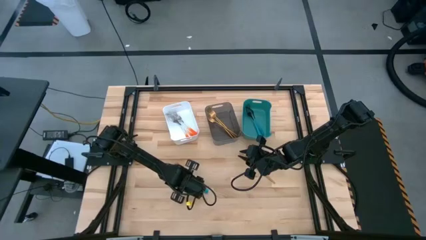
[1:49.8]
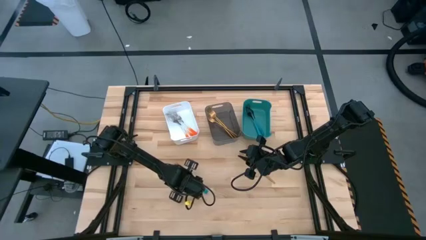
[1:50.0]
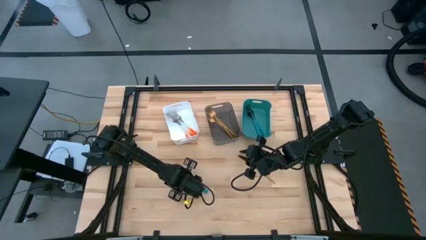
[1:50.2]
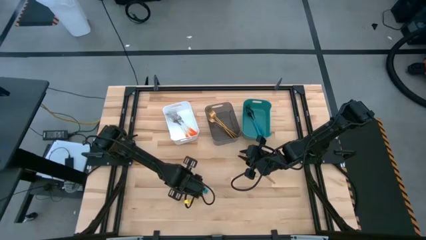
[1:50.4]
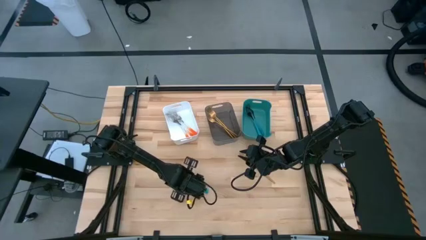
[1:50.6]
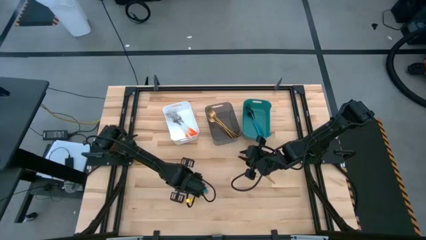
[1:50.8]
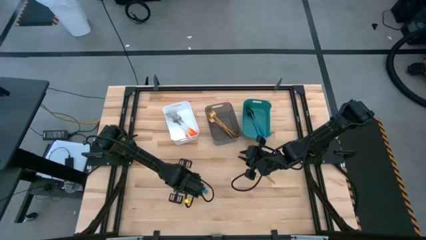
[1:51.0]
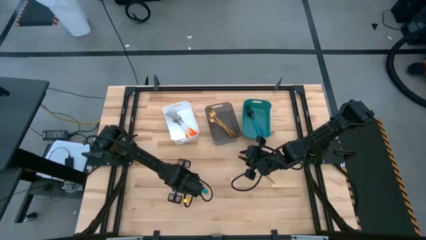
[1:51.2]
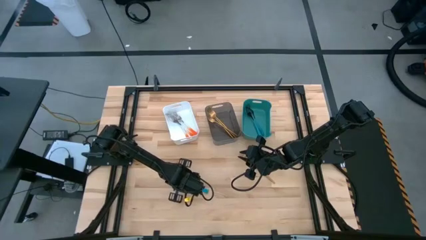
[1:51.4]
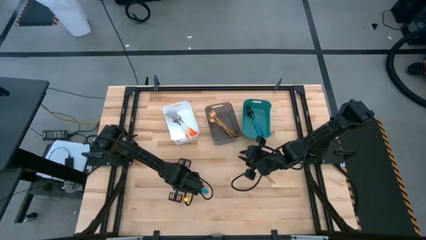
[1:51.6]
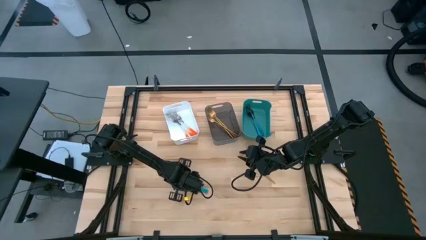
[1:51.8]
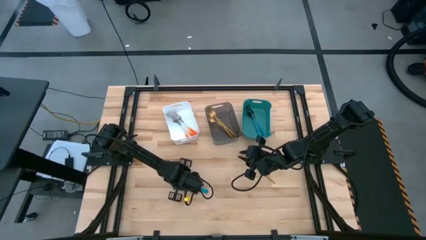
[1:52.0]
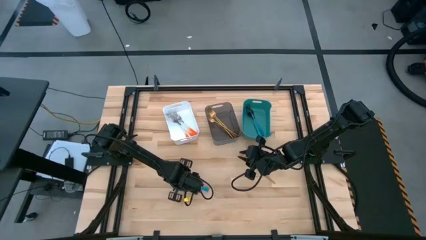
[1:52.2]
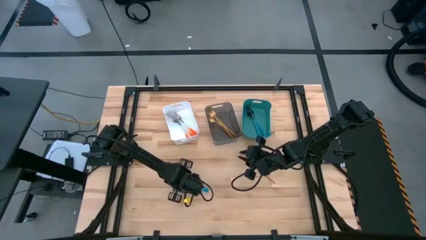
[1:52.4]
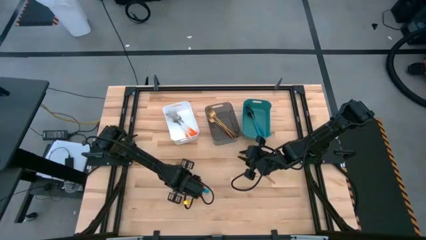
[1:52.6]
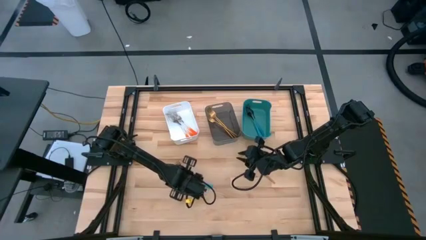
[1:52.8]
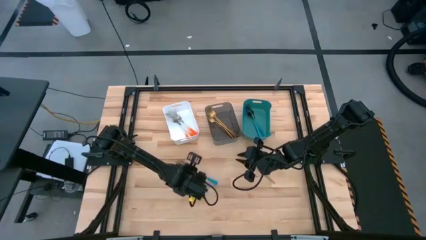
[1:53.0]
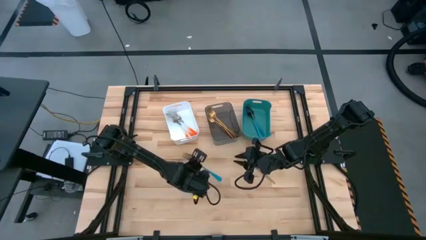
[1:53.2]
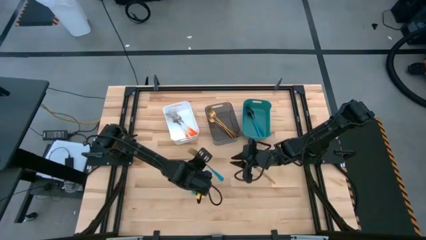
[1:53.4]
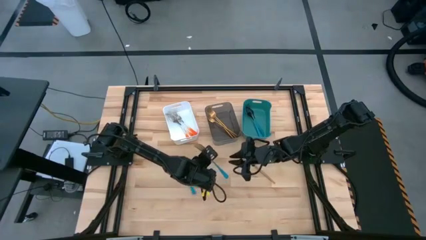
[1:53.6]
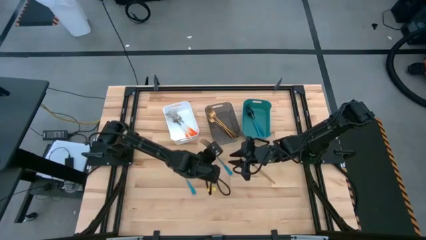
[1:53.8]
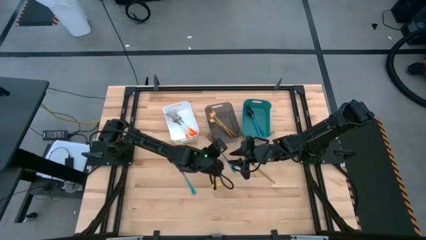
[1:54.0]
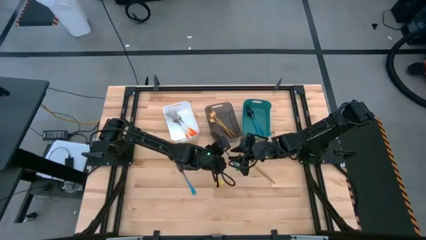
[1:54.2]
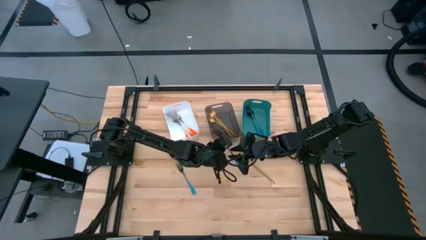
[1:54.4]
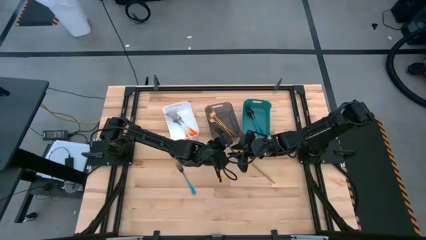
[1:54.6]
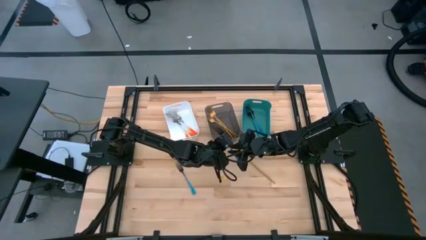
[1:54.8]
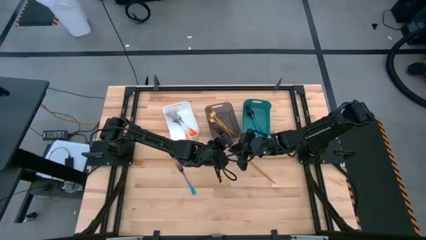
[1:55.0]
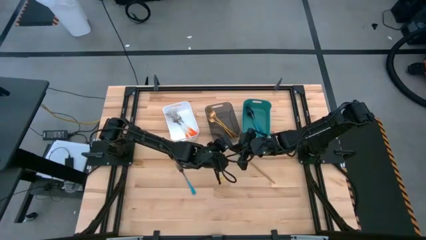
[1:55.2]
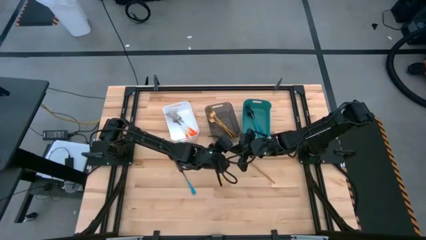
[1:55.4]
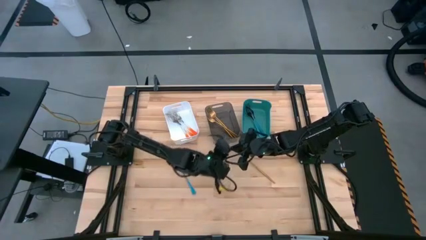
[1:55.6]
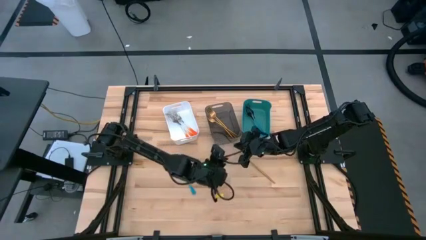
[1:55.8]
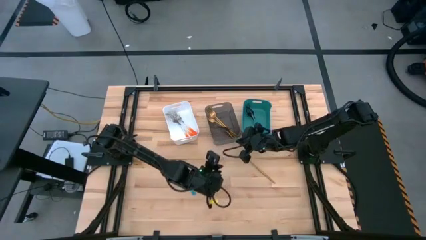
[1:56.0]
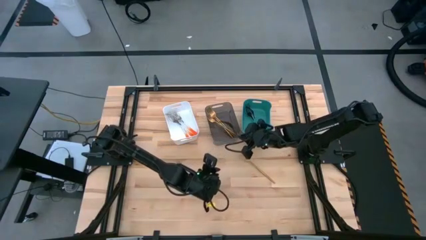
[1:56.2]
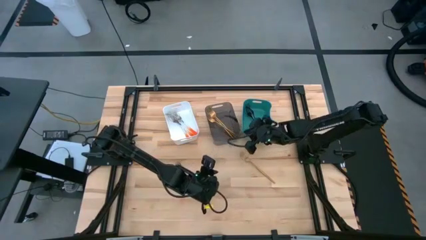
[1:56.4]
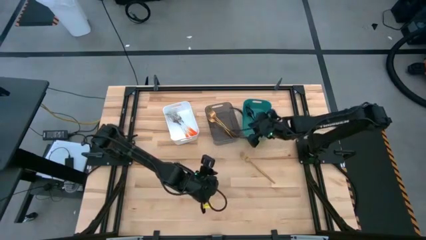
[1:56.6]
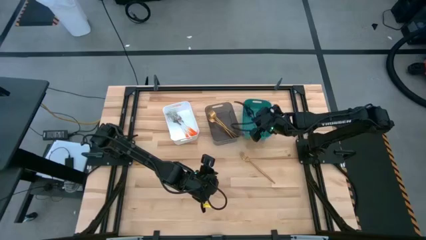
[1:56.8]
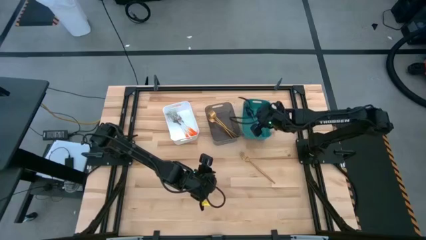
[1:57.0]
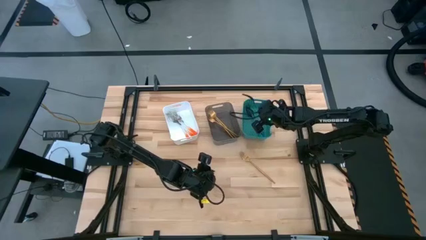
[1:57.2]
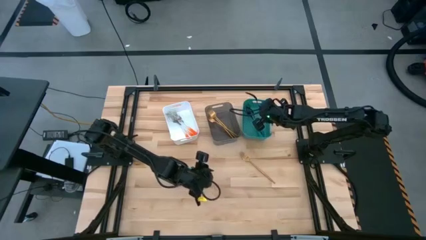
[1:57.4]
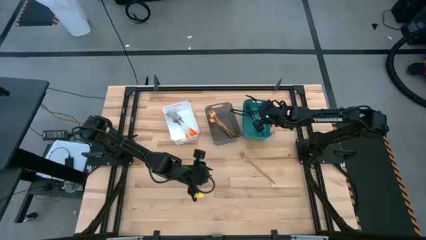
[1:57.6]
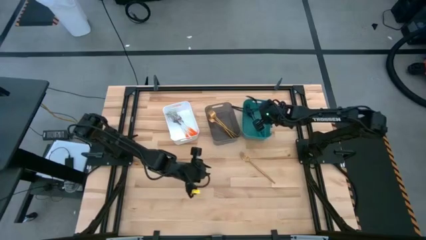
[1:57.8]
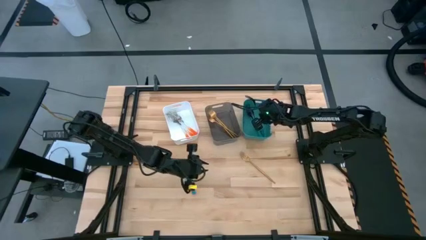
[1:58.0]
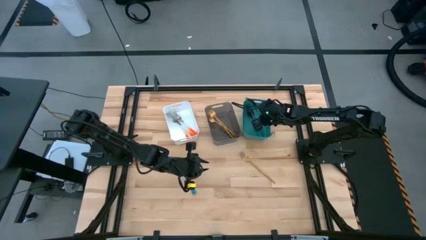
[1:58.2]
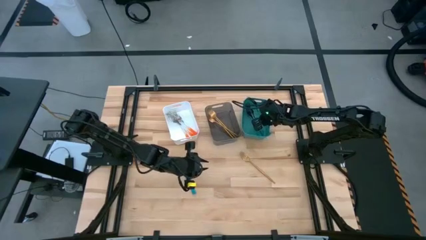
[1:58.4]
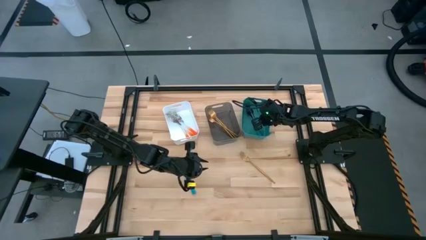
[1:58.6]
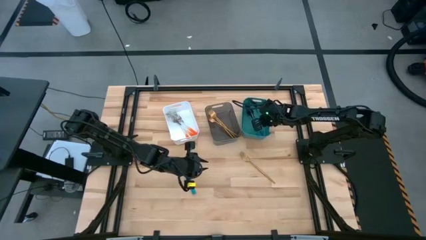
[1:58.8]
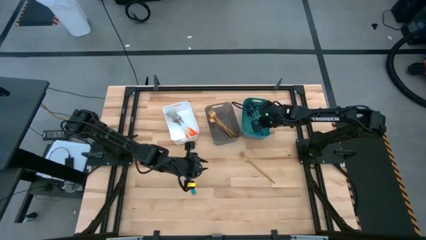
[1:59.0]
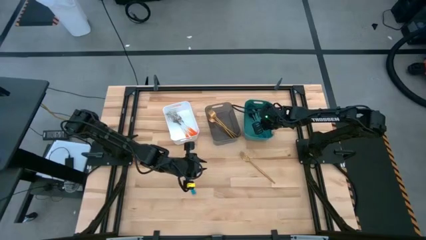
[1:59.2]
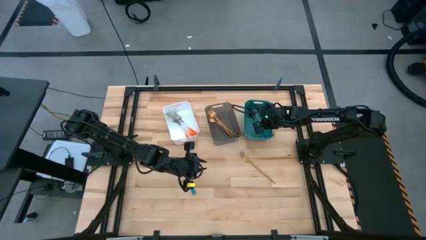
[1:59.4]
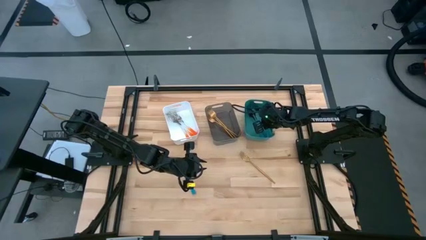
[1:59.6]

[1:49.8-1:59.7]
Task: Sort silverware by color (type)
Put the blue fork into the green bin

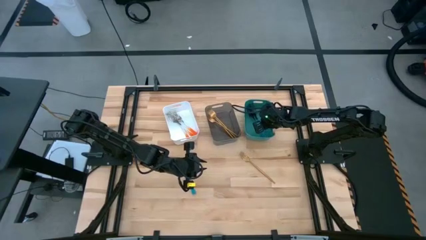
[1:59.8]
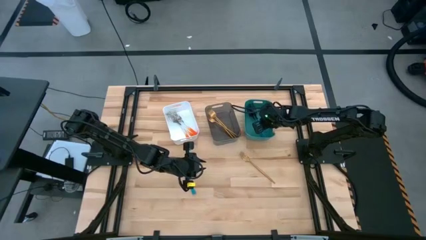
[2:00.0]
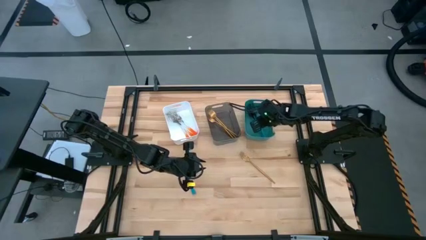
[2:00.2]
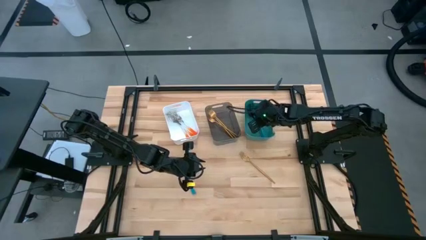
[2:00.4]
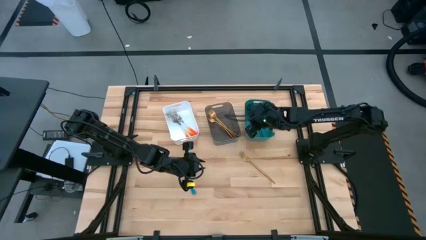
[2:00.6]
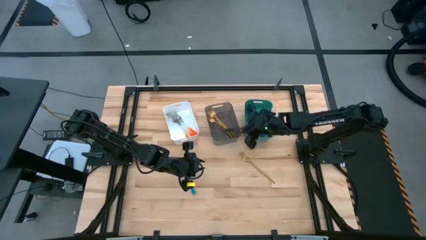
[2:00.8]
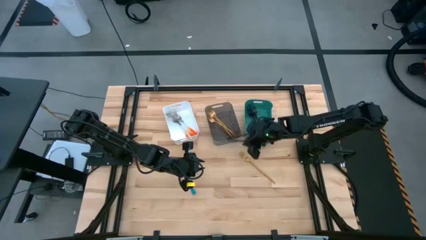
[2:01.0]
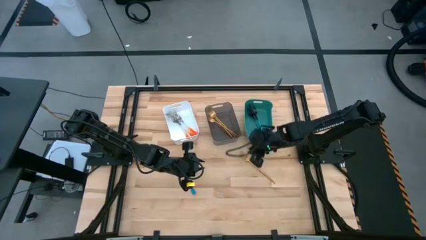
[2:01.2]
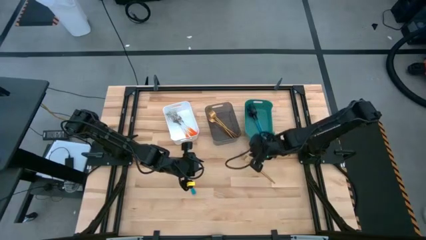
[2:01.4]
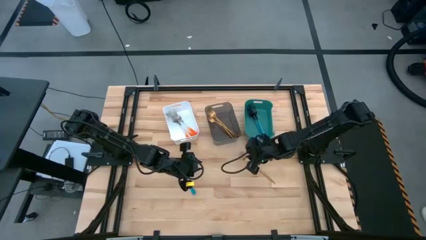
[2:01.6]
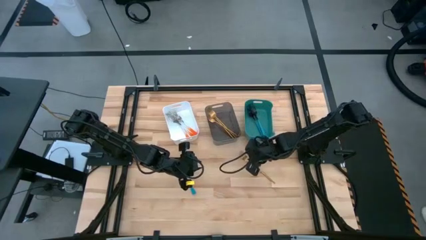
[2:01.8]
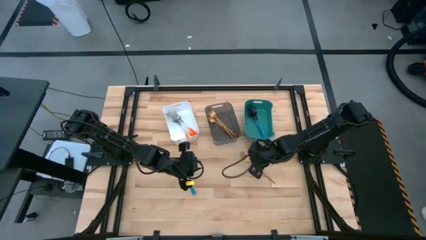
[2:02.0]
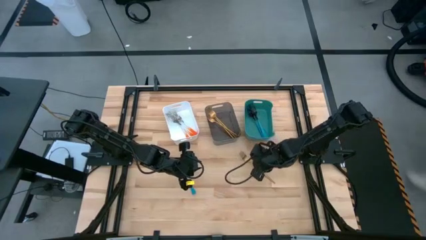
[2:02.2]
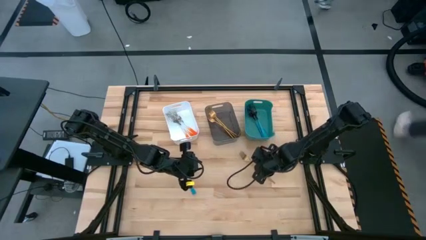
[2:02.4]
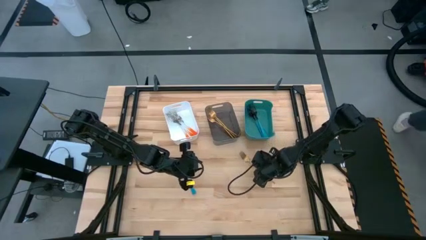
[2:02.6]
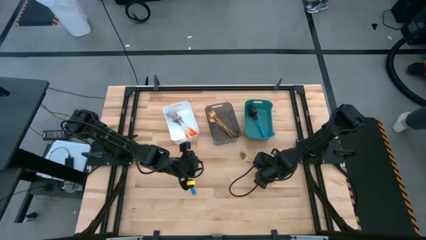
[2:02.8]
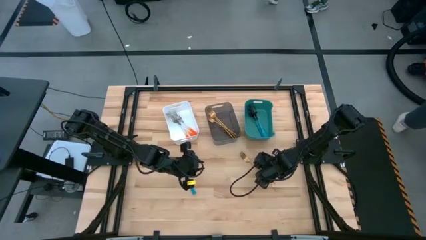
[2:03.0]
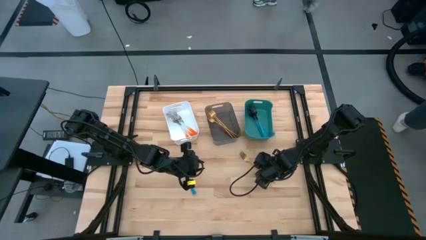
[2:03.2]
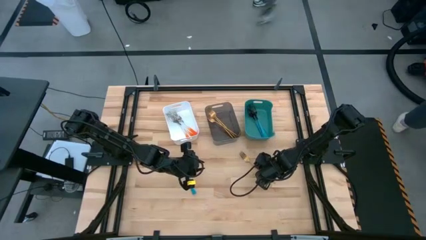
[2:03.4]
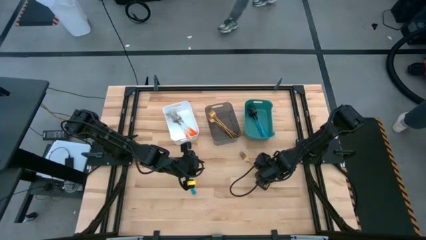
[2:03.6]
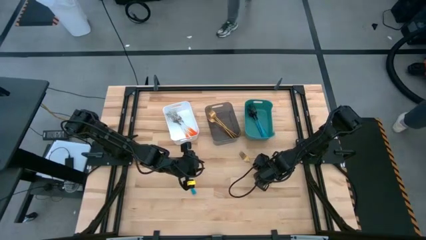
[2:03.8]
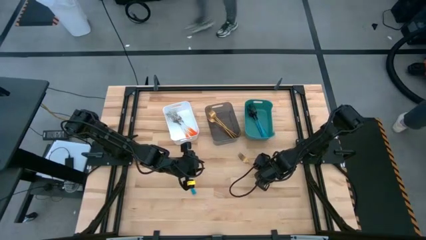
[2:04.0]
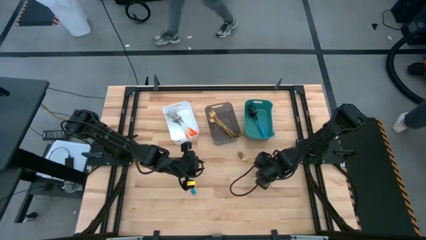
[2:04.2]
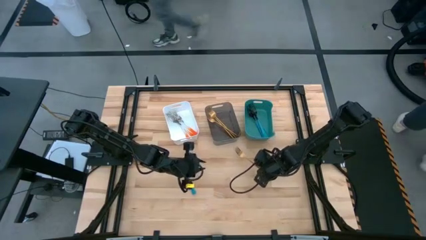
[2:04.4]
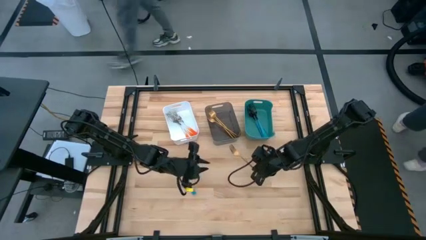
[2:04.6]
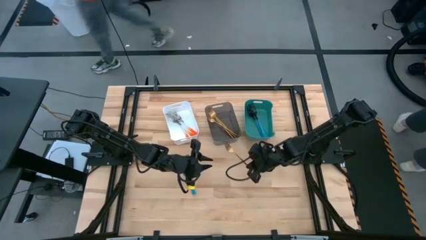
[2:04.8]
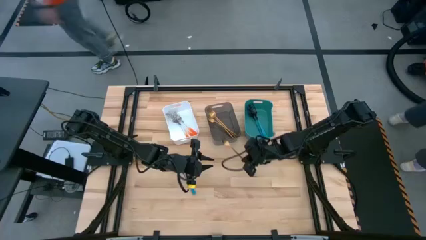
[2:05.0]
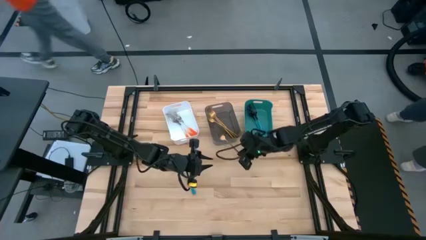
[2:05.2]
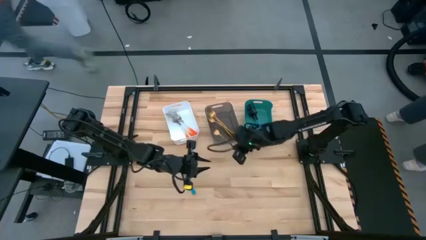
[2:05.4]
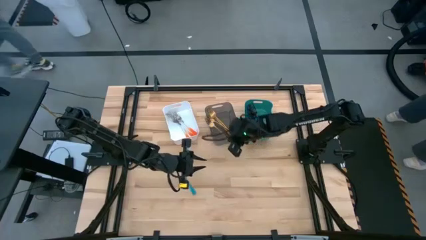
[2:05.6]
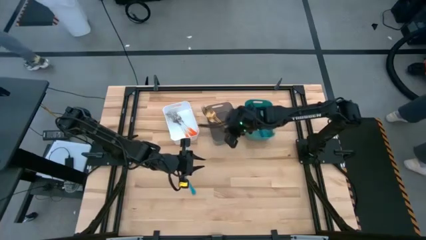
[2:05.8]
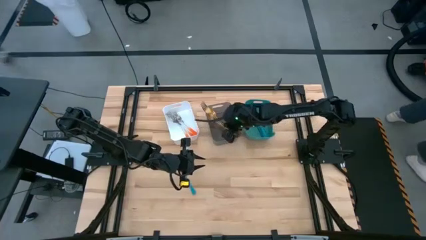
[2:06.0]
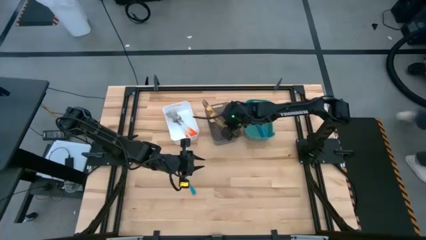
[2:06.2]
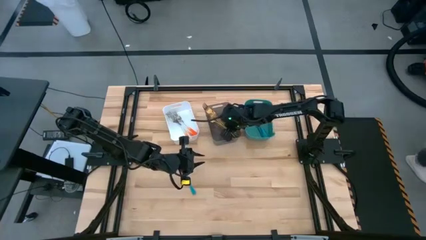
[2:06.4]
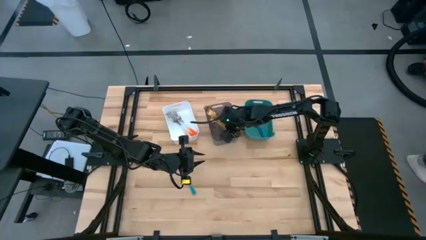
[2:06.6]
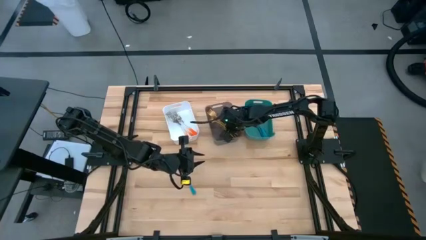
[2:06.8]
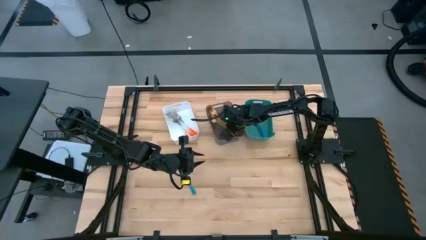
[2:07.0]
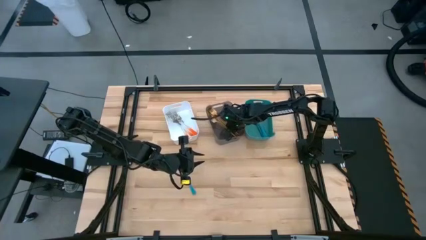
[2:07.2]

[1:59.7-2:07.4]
Put the gold fork into the black bin
